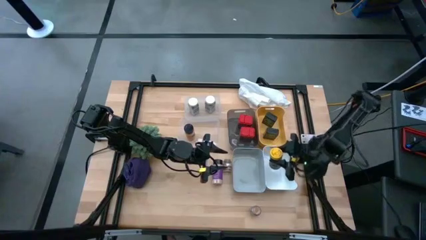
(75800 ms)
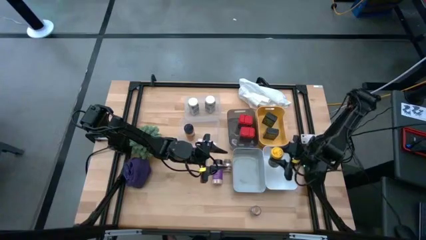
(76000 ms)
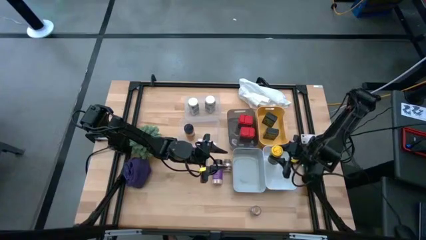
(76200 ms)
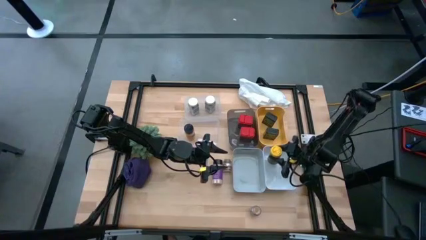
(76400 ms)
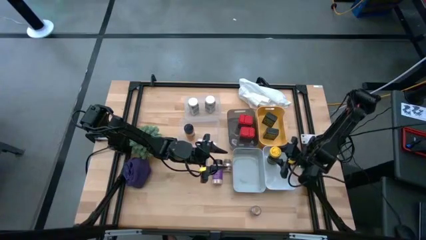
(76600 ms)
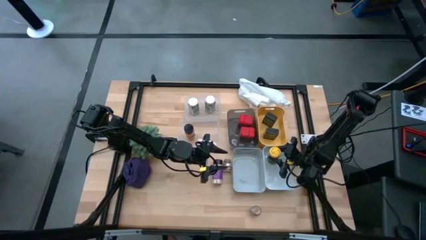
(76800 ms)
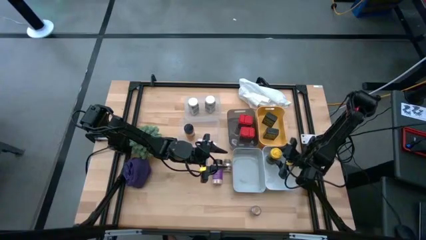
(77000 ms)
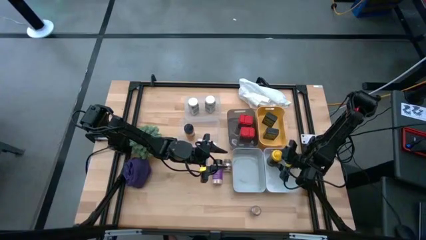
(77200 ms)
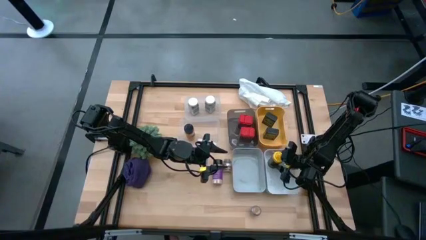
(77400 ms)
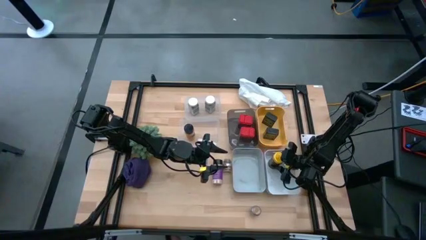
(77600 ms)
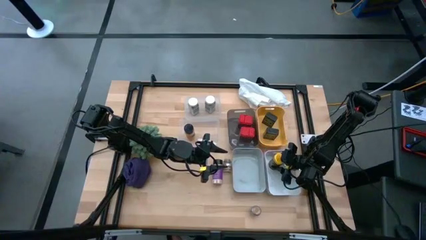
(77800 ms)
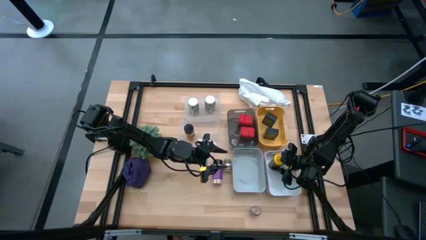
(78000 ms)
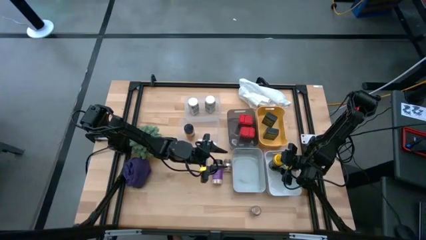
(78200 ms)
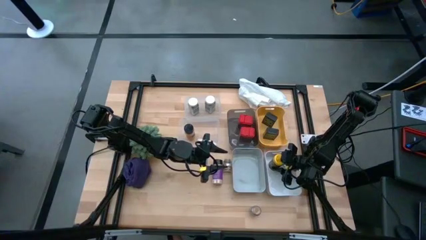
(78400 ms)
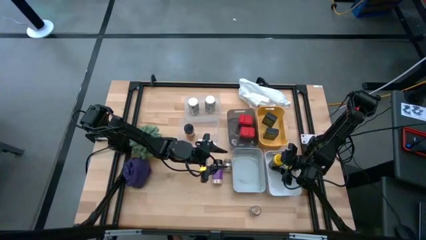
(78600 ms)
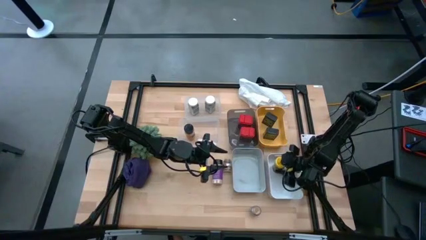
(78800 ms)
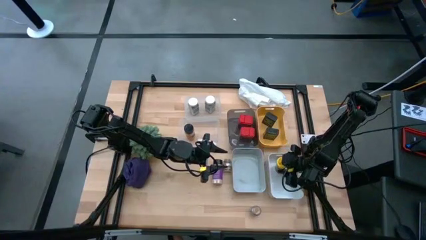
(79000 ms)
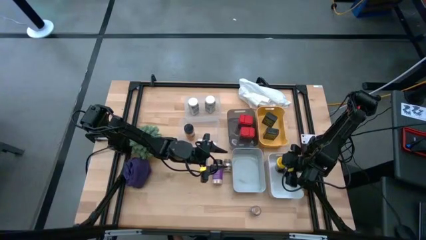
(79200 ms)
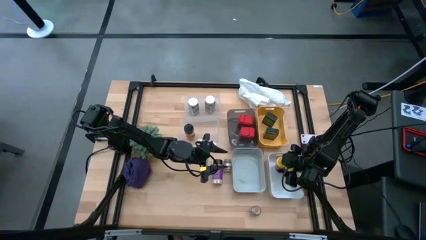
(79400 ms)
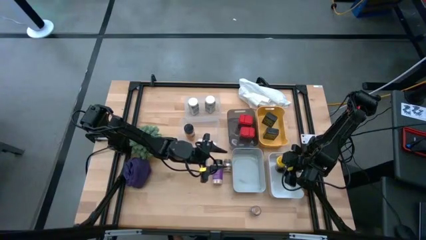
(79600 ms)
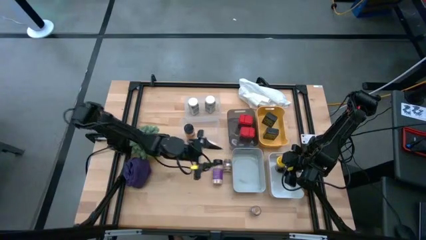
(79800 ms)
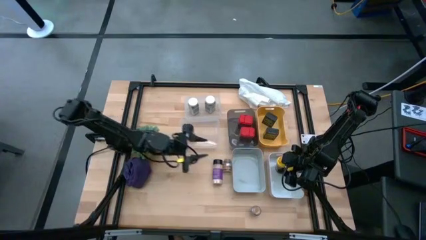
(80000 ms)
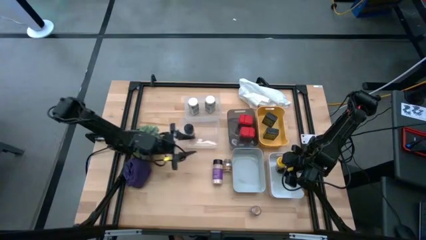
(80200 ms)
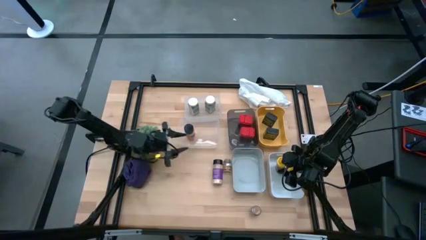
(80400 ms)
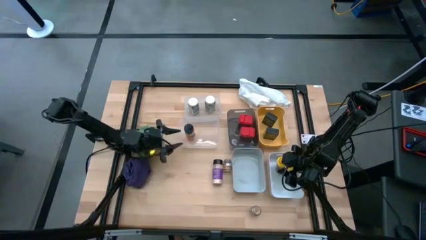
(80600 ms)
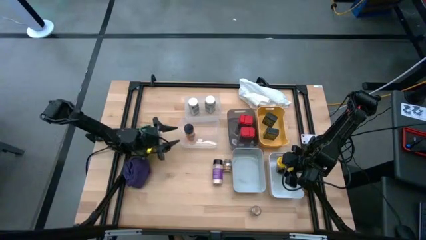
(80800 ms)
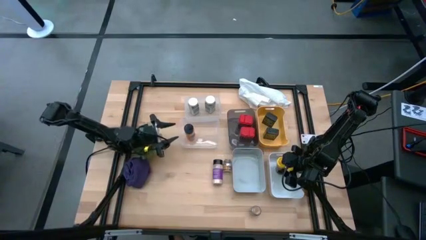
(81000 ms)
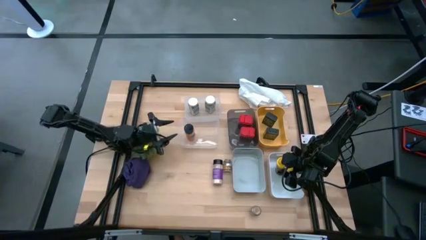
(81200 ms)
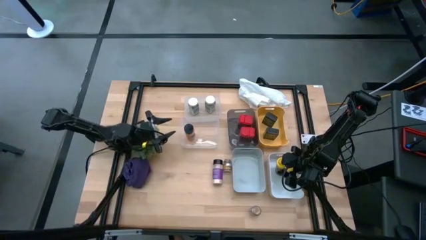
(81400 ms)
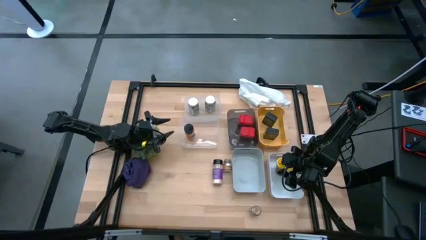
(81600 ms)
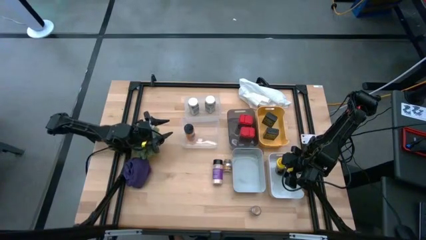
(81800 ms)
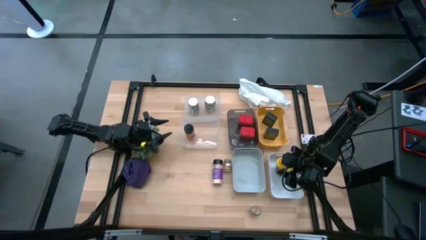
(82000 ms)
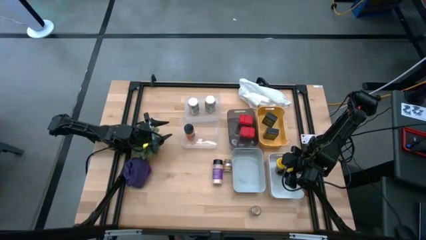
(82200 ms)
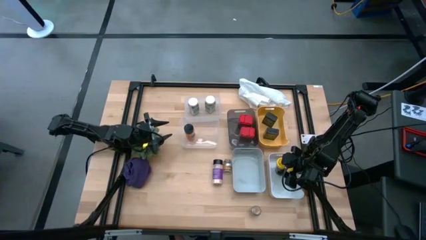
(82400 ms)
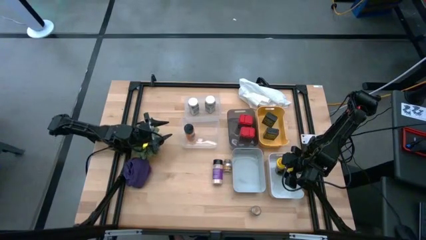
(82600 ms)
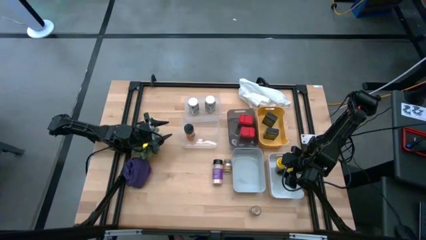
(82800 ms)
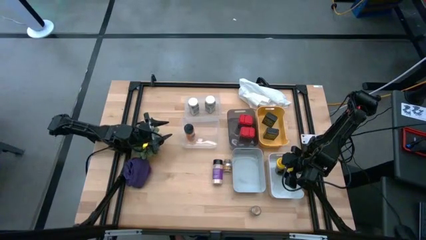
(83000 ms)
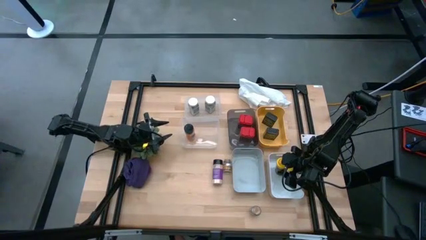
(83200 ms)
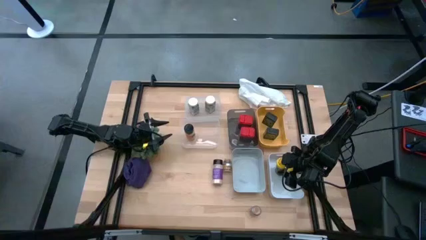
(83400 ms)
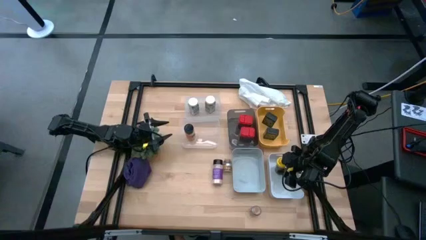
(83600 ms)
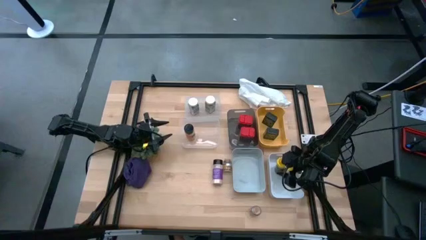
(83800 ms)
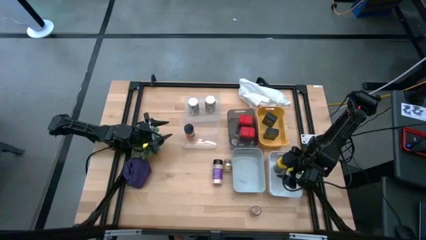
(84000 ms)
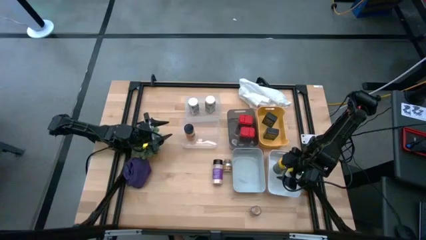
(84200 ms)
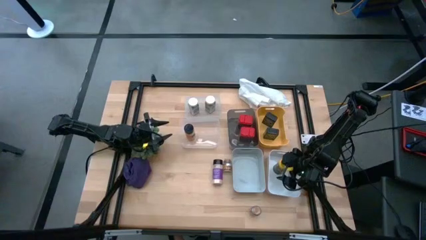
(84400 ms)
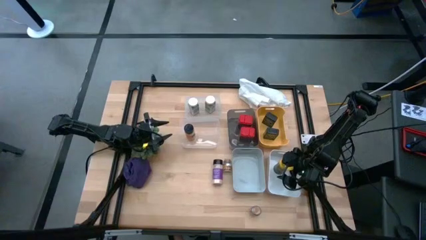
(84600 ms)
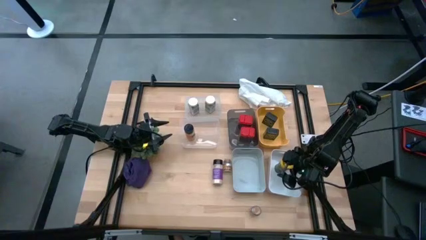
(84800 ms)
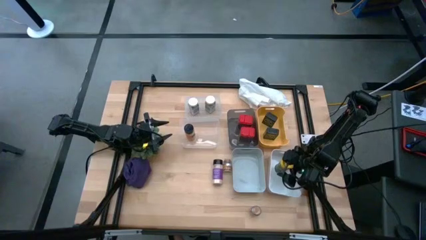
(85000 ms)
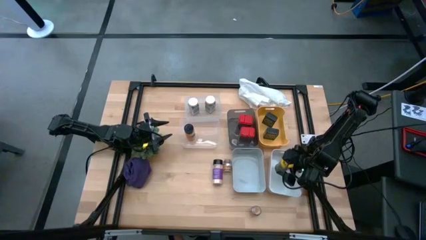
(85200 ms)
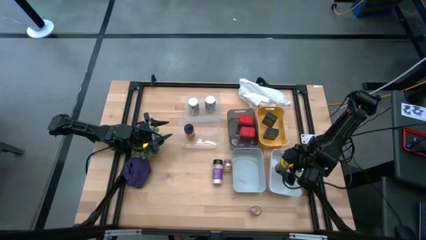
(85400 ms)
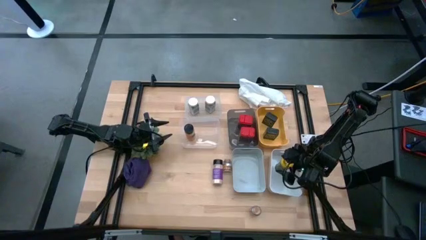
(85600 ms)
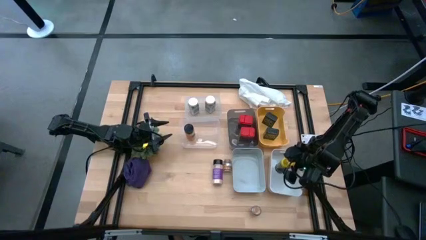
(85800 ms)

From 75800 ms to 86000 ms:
Task: Sort spices by type
Put the yellow seasoning bottle into the white bin

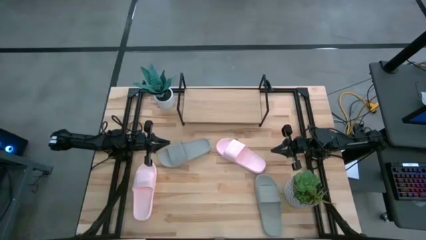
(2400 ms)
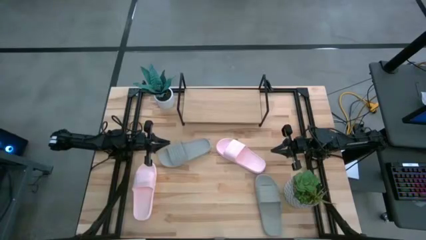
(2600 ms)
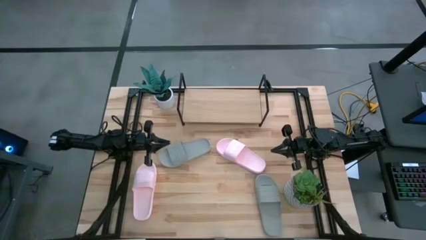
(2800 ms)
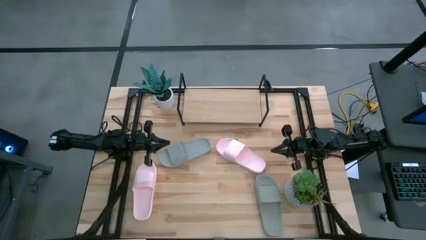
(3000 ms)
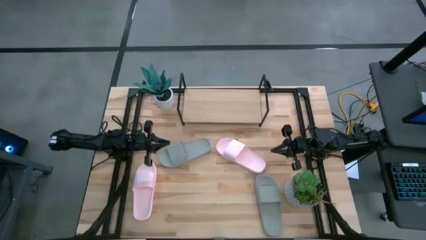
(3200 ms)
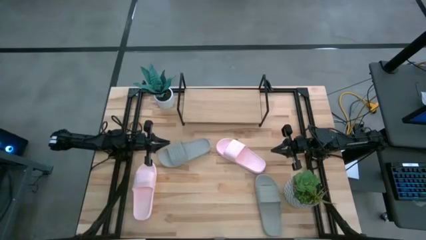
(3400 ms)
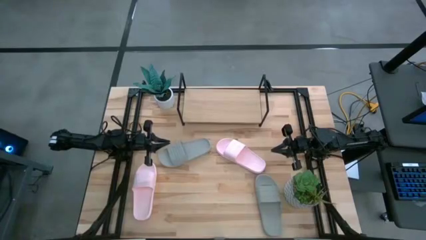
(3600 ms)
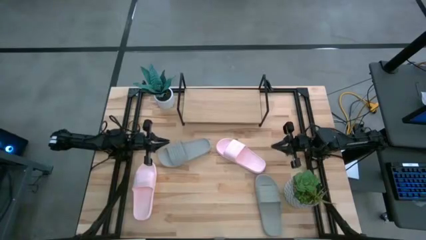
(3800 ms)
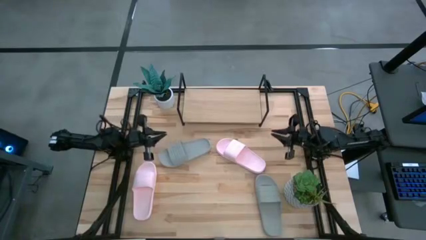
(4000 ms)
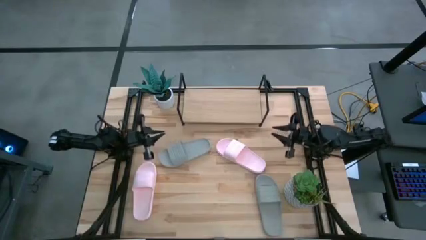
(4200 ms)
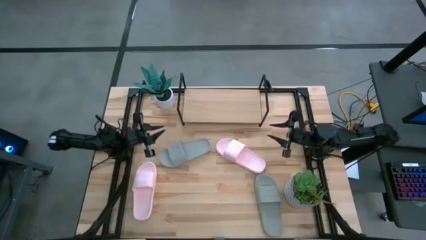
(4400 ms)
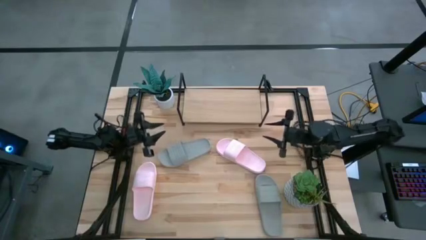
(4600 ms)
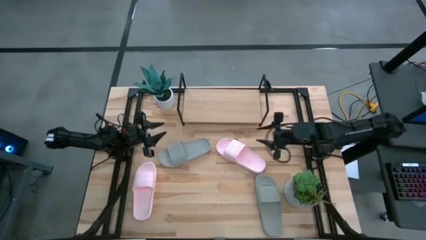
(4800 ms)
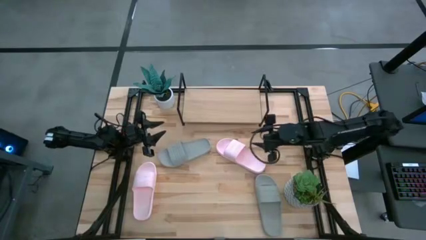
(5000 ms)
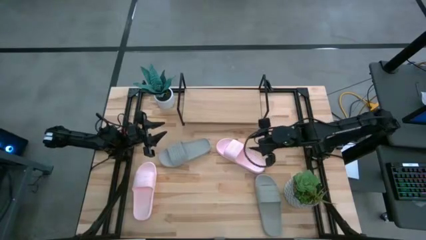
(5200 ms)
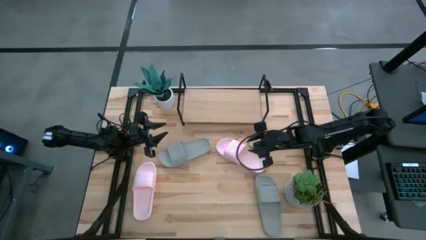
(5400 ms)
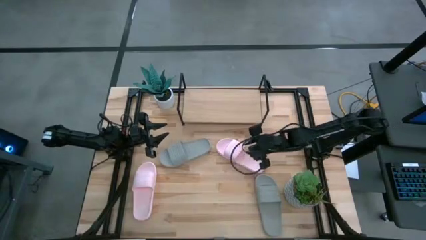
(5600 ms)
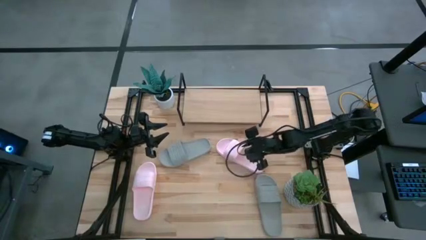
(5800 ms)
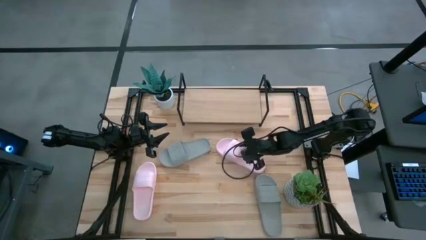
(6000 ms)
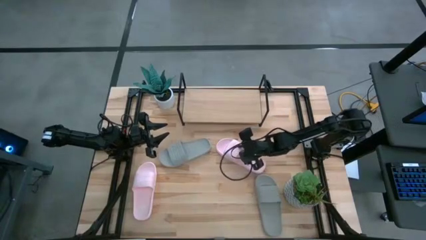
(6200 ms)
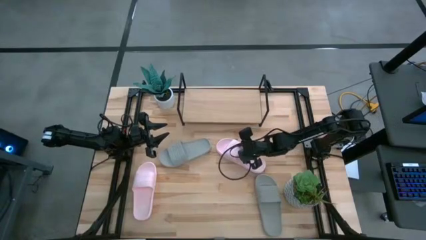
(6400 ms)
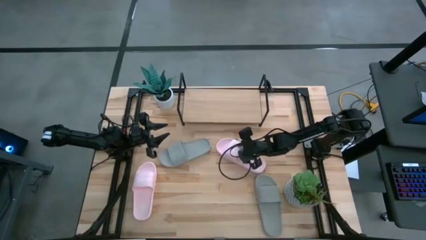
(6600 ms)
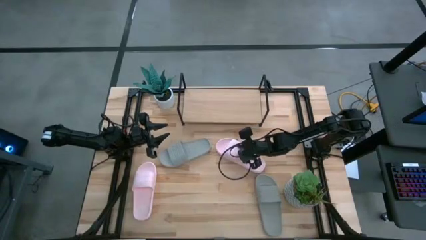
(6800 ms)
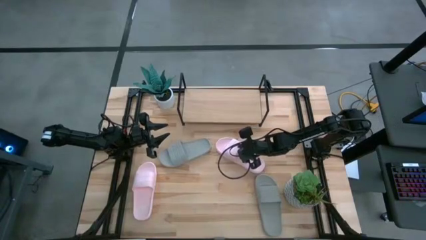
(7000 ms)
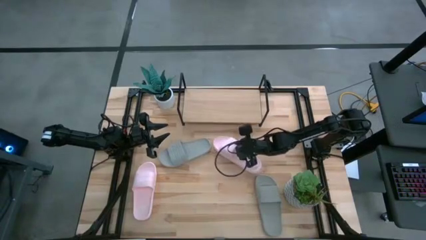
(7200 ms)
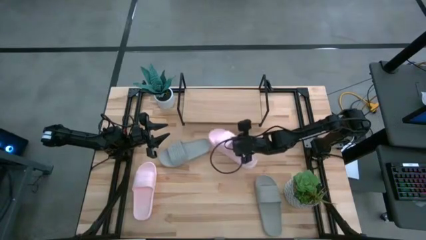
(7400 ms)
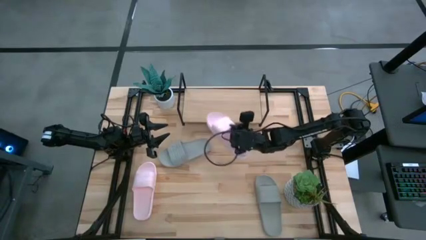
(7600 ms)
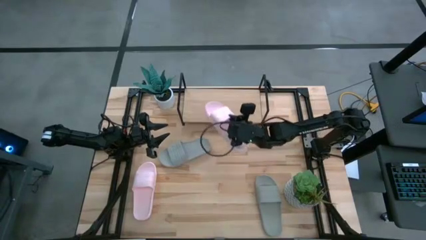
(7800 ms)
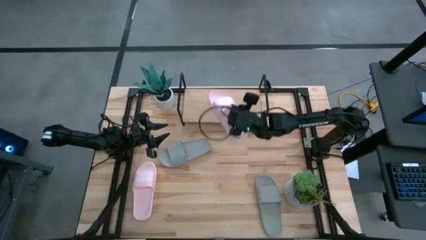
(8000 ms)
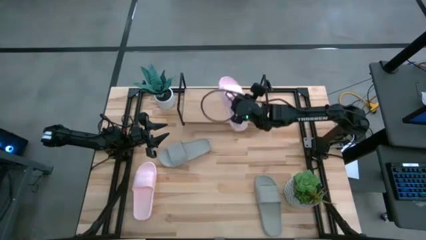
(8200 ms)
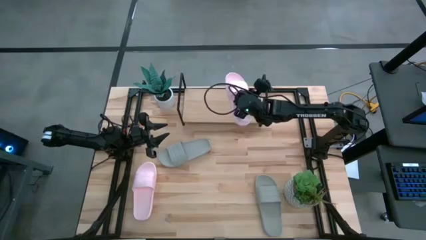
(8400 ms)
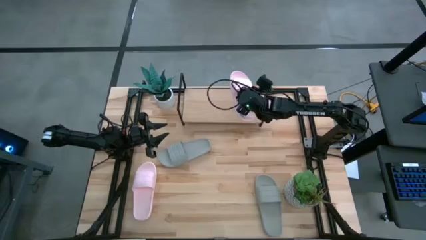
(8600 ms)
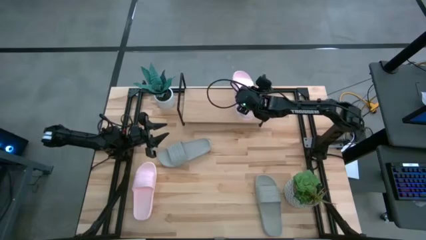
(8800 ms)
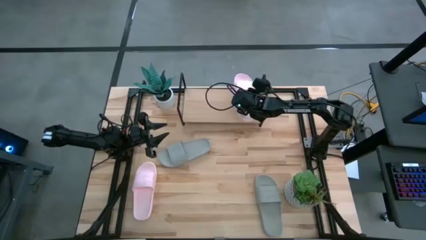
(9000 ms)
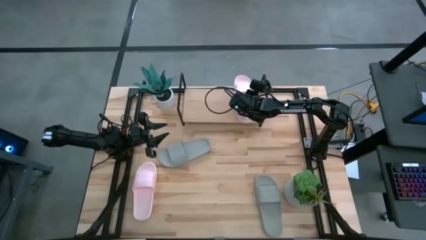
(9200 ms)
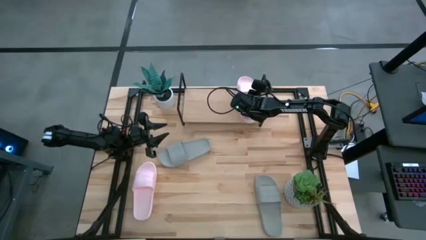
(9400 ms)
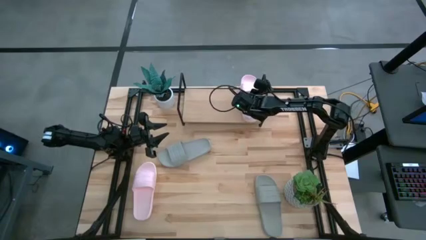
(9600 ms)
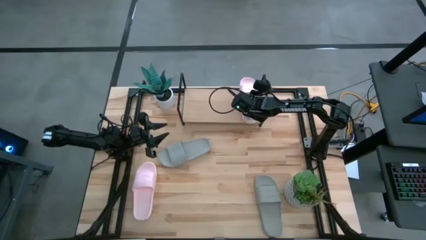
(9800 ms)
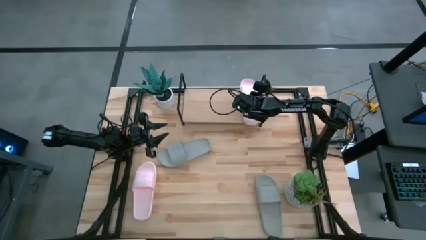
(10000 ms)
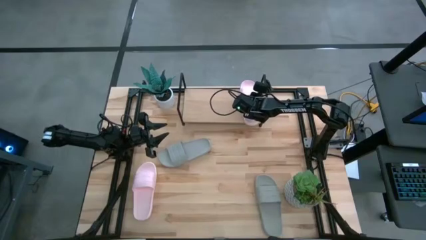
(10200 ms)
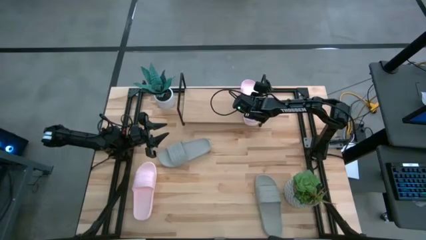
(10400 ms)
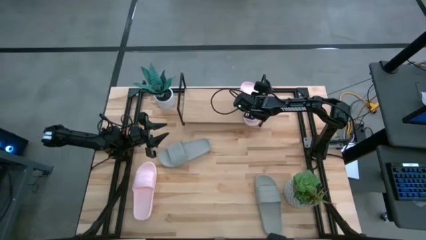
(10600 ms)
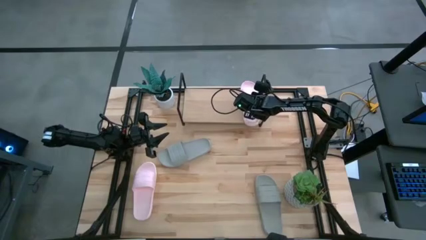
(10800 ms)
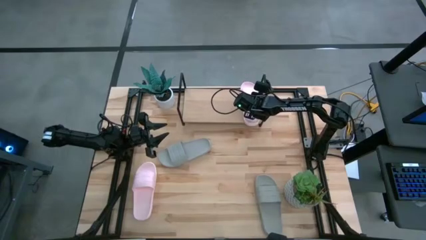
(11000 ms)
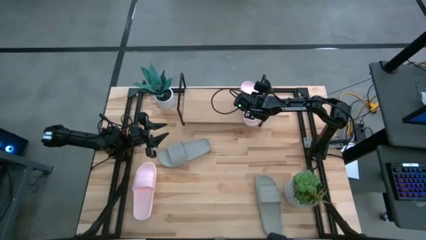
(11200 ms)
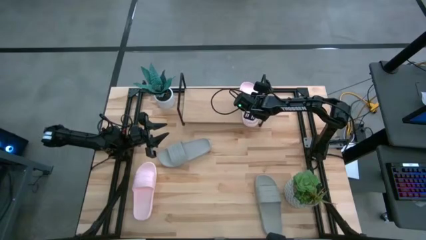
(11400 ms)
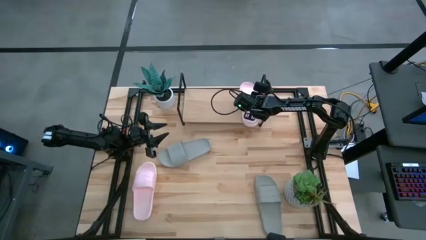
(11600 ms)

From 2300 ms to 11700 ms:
Task: Pick and place slides into the shelf
Put the right pink slide on the shelf
